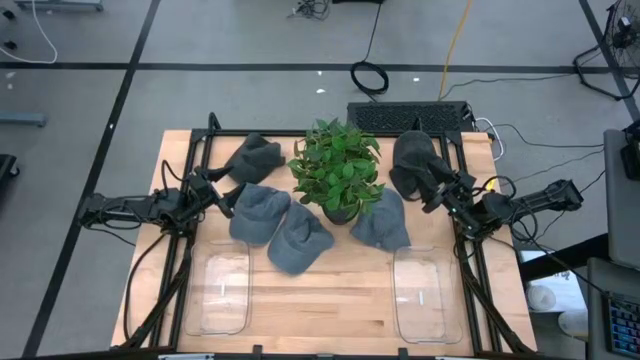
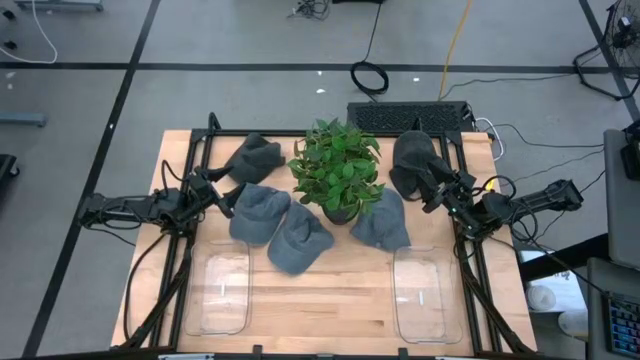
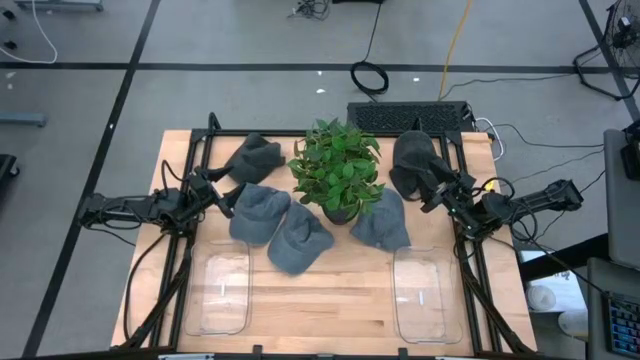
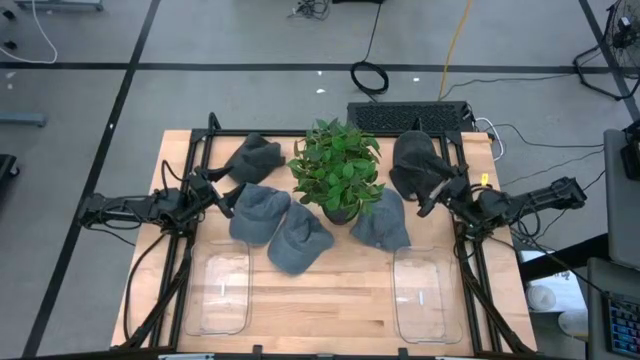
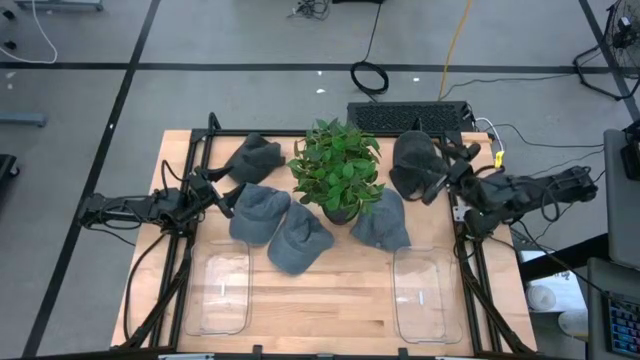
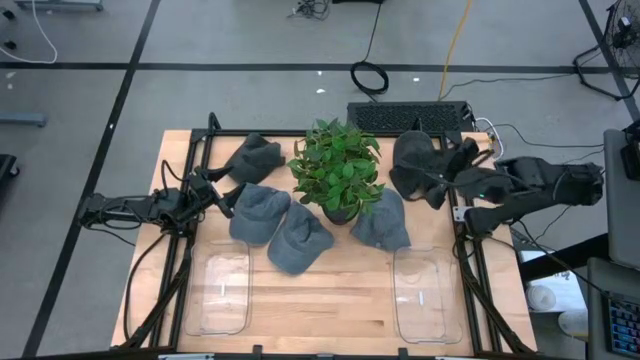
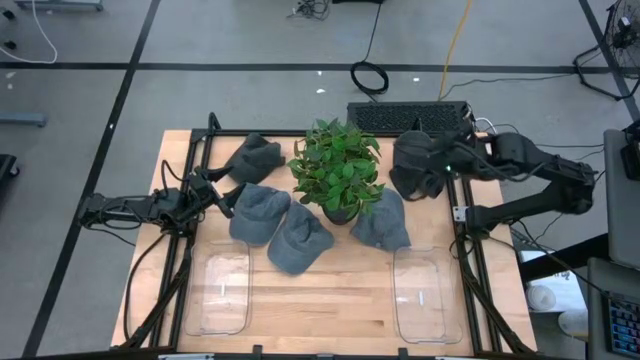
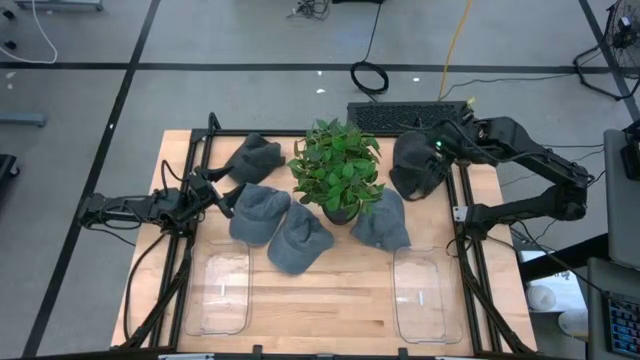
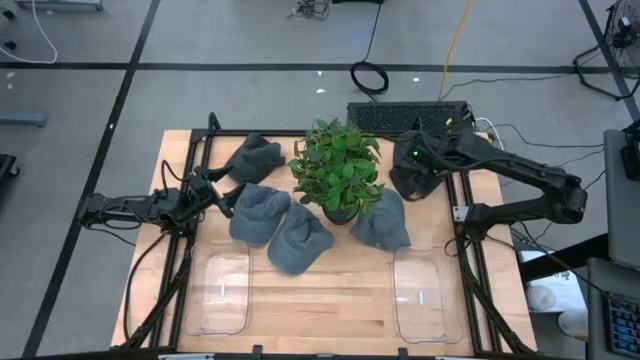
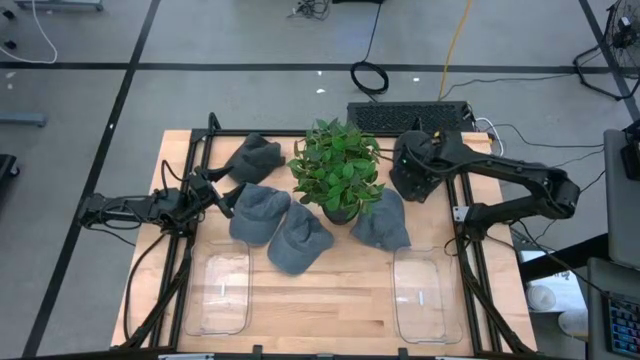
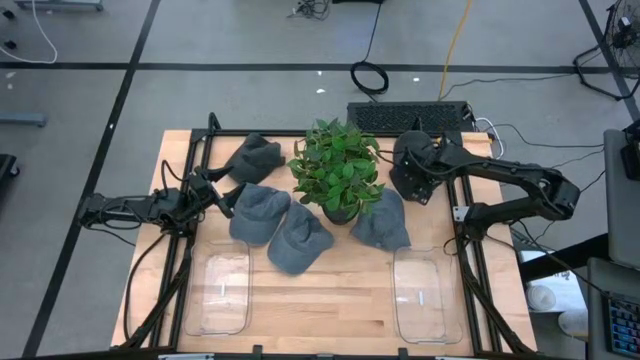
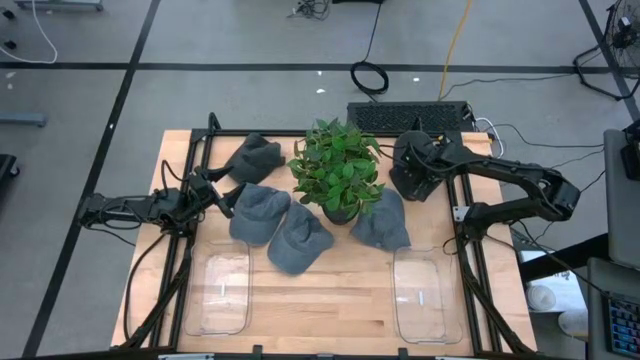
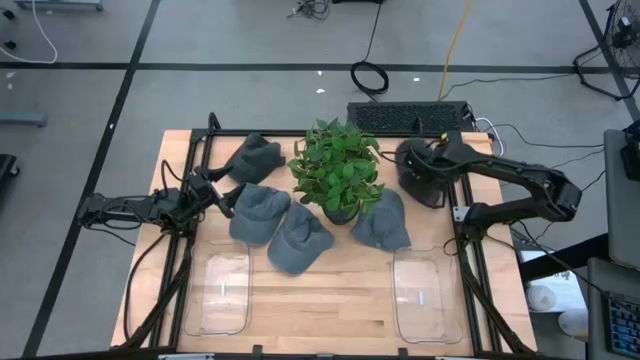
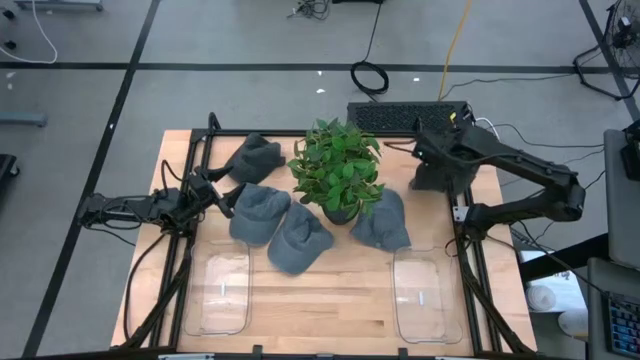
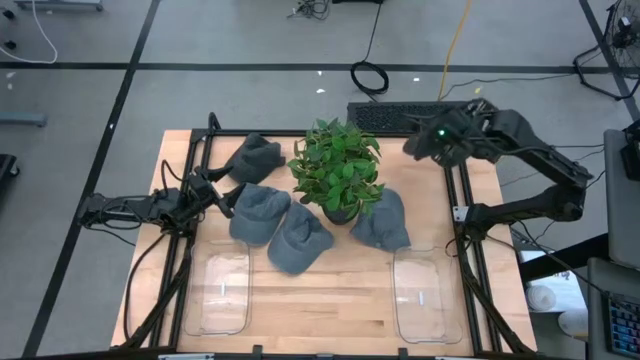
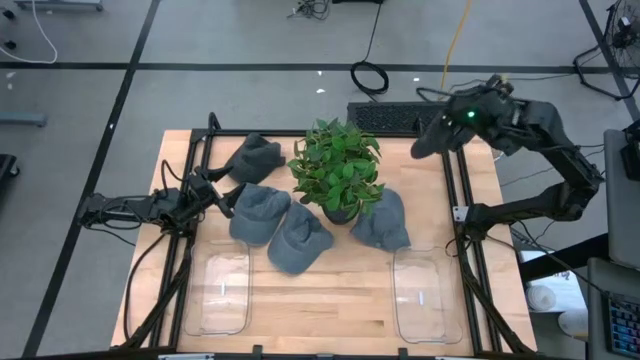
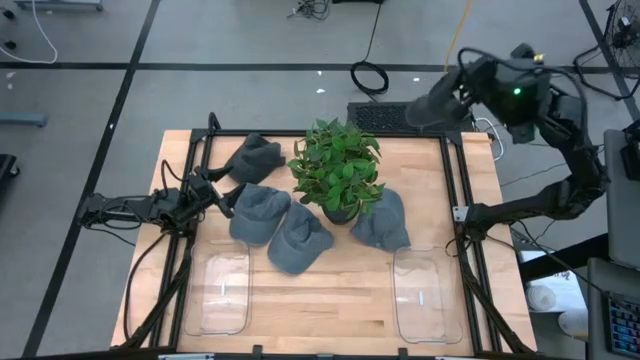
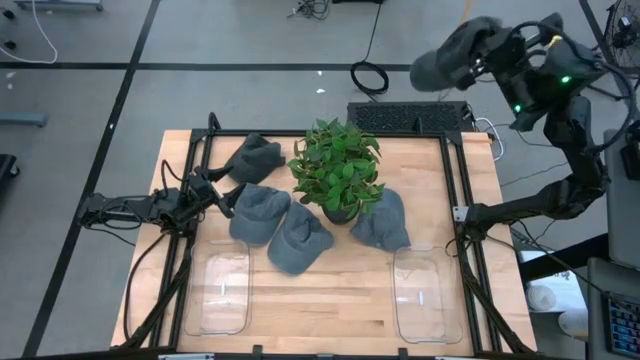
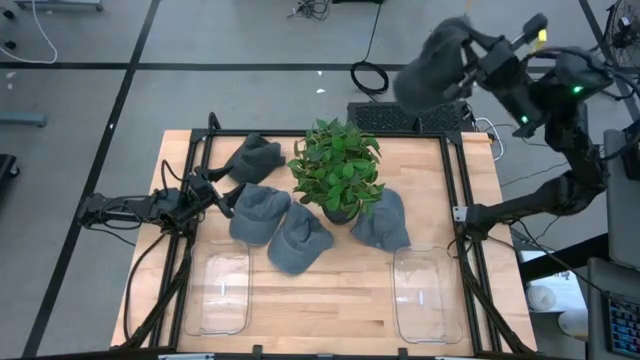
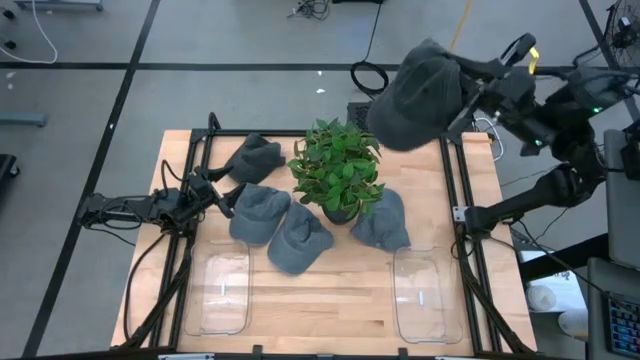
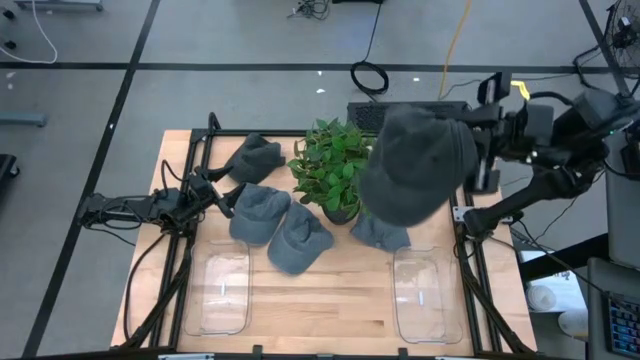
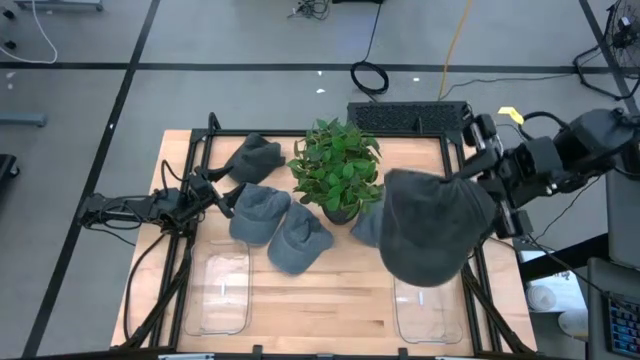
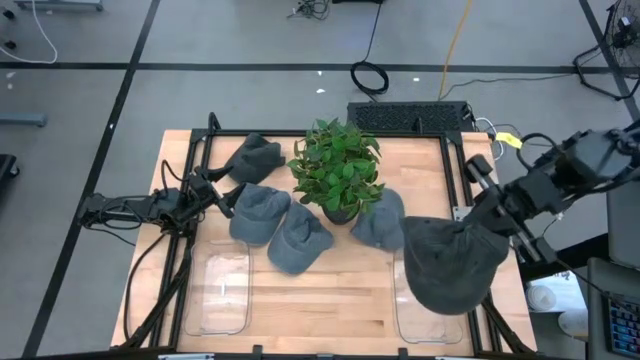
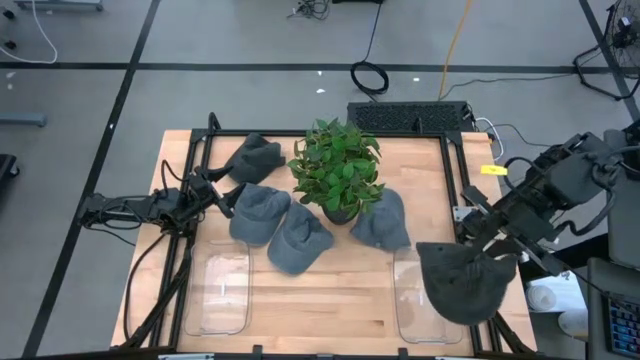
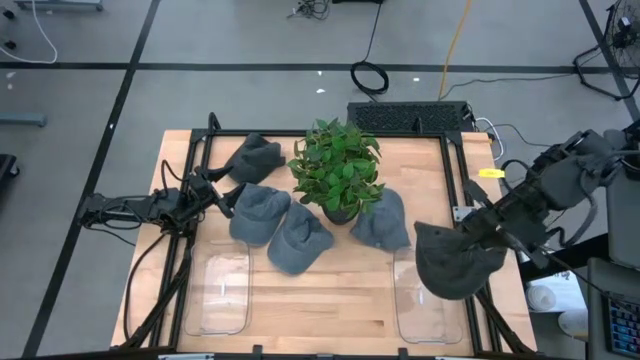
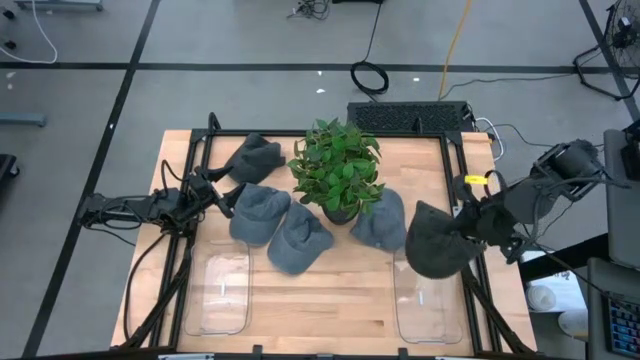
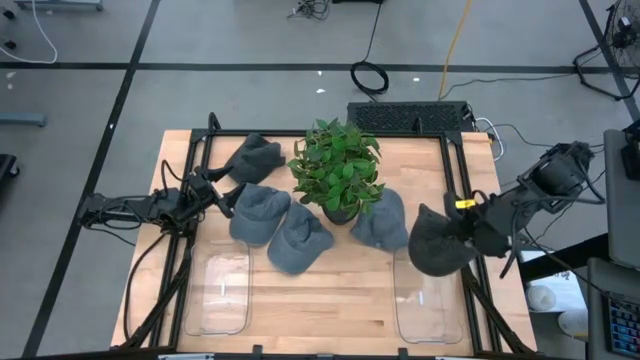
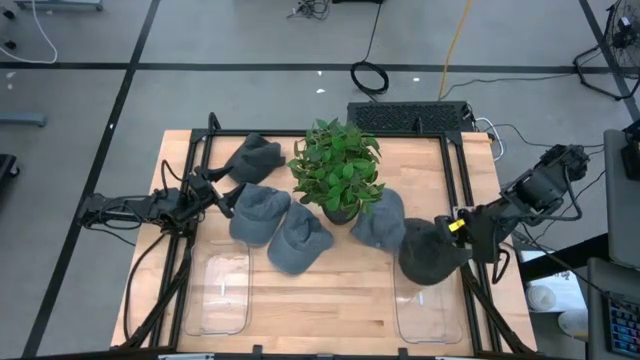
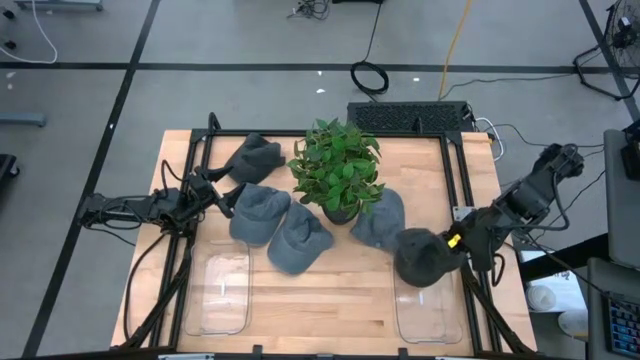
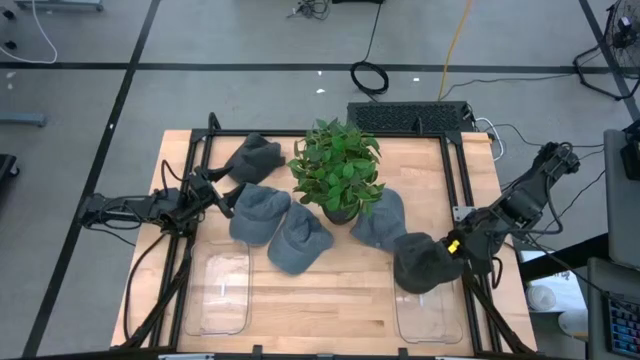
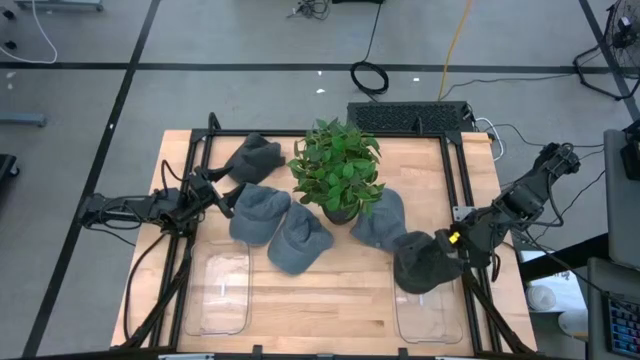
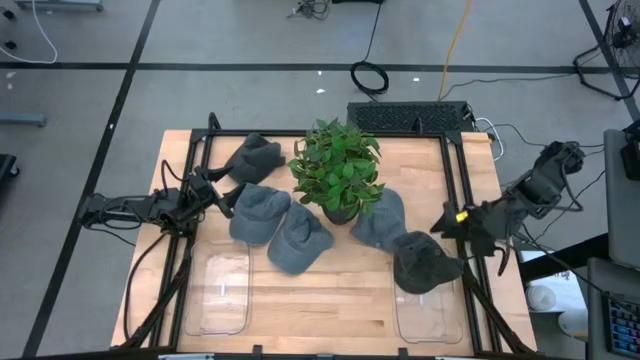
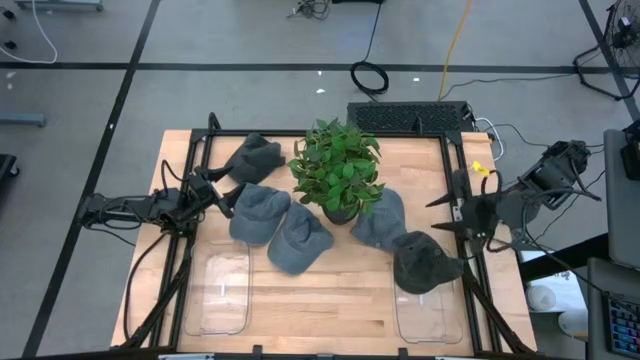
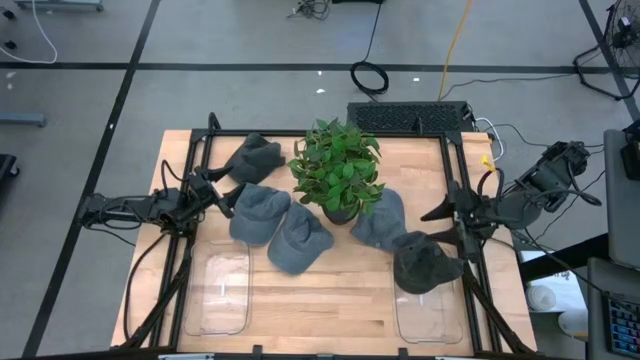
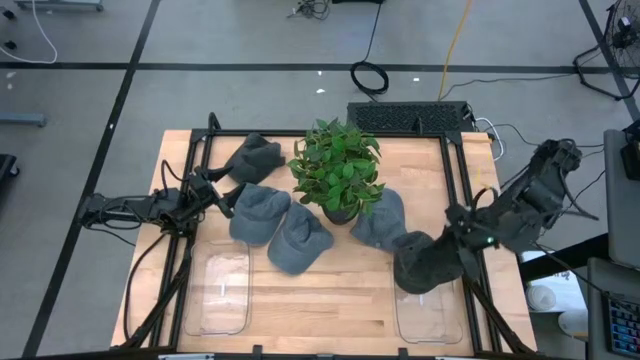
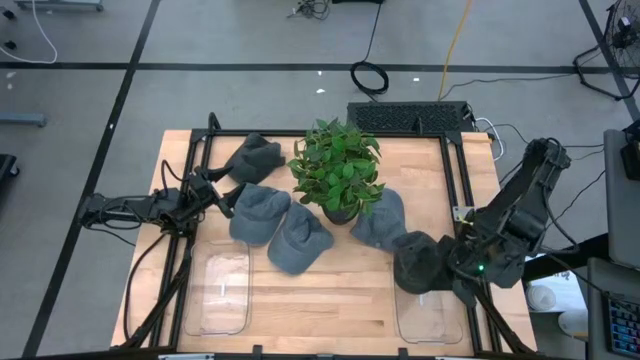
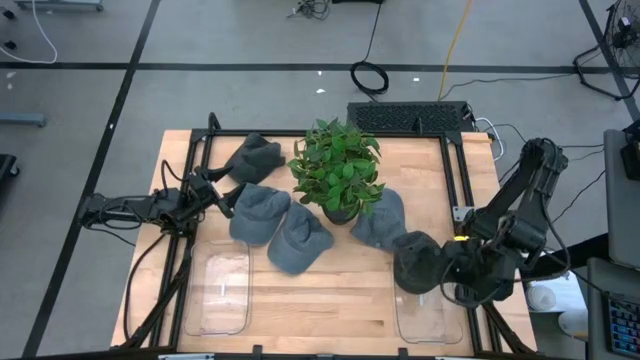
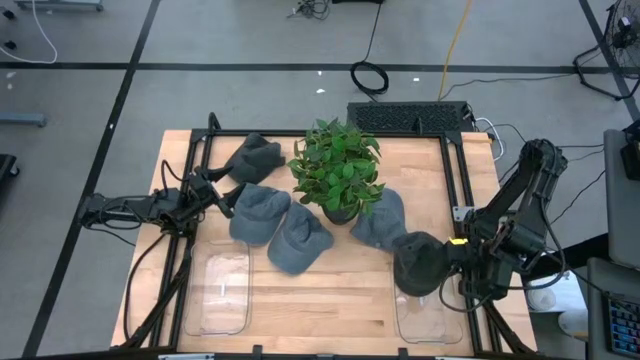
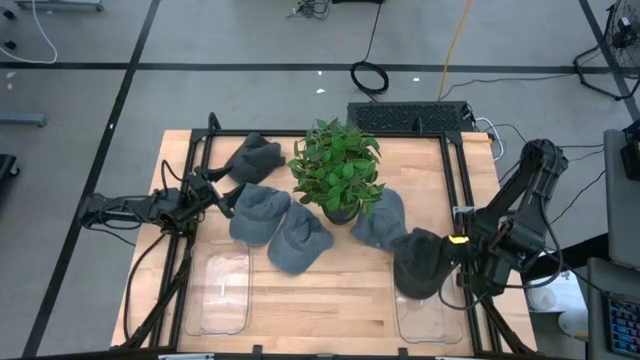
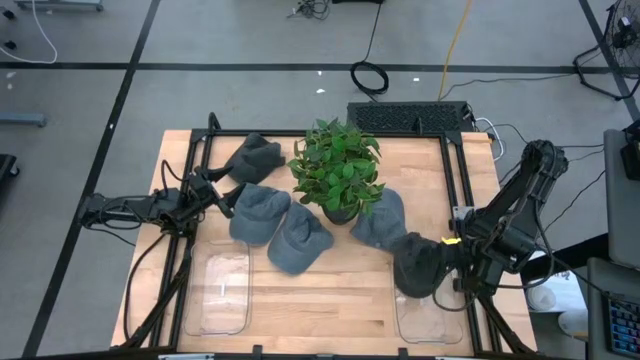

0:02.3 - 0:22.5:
Task: Pick & Place hat
Put the right black cap into the right transparent bin
